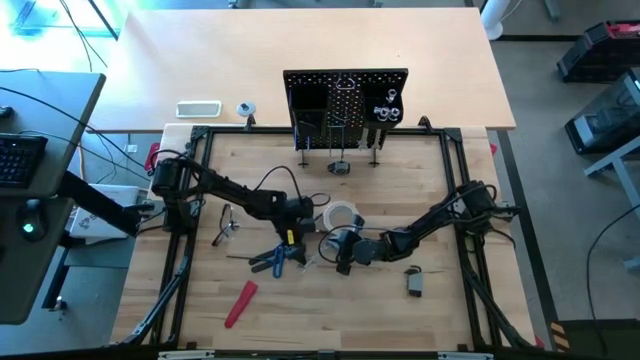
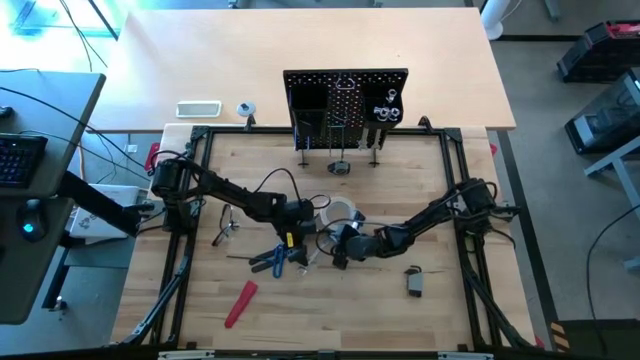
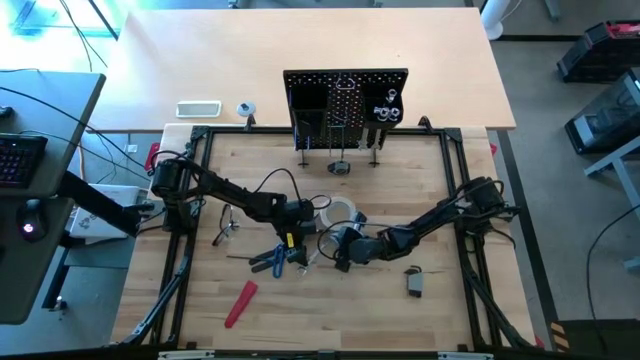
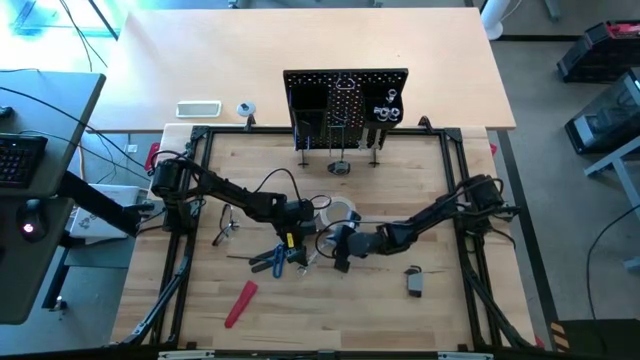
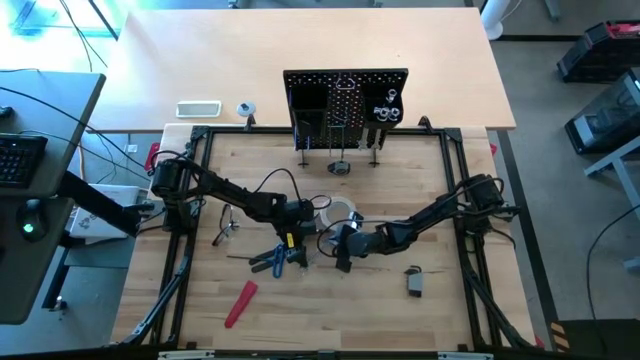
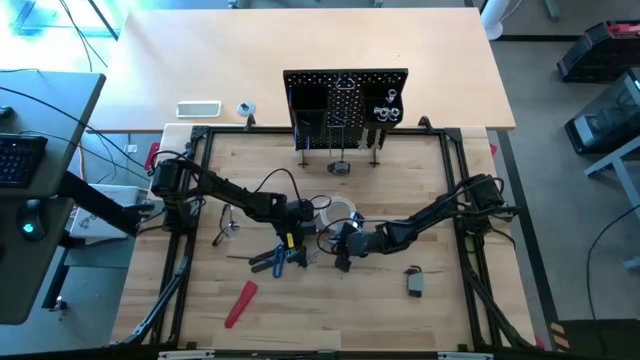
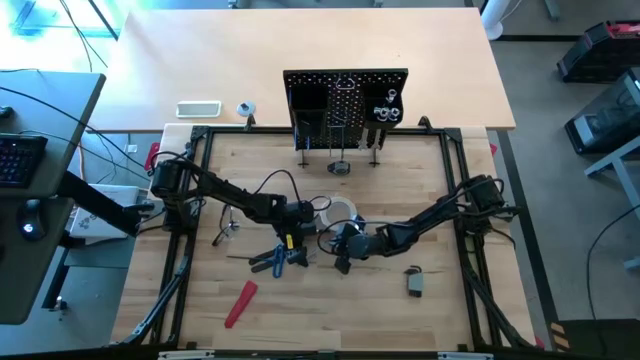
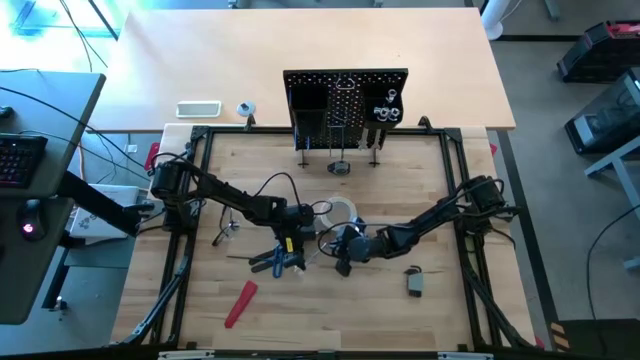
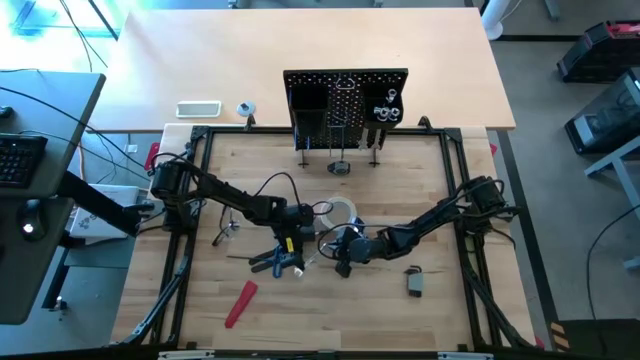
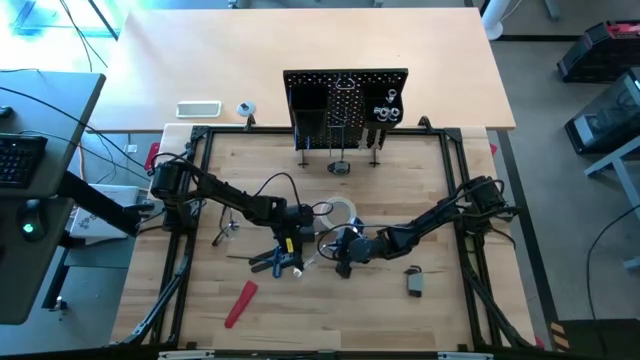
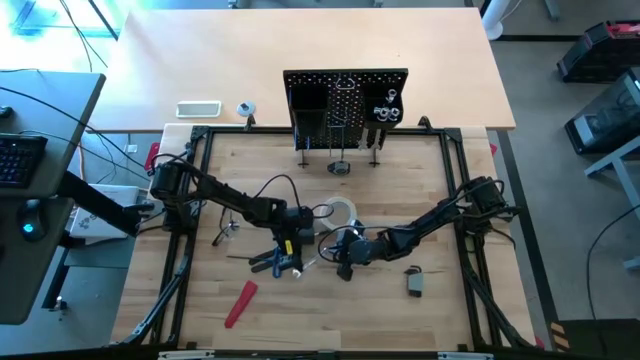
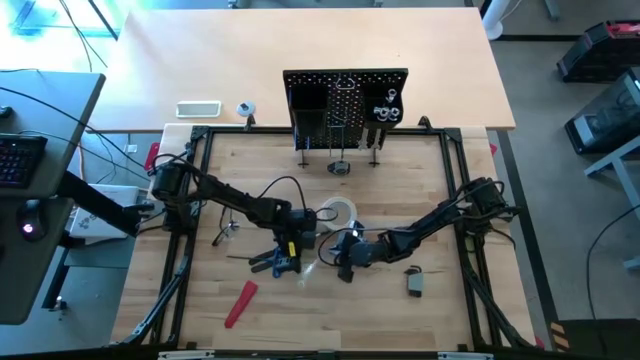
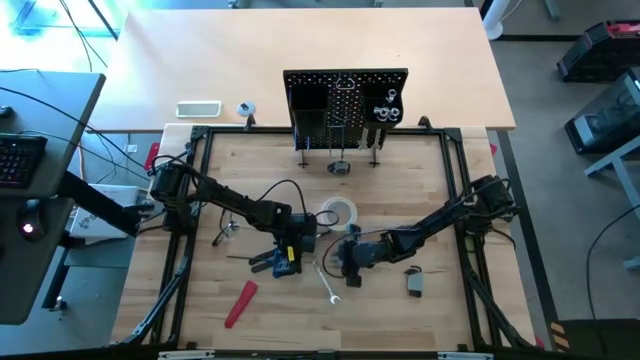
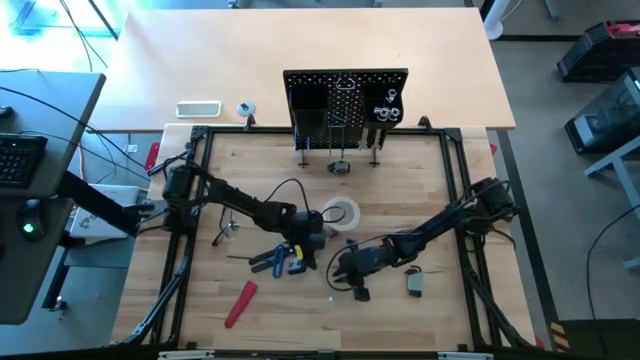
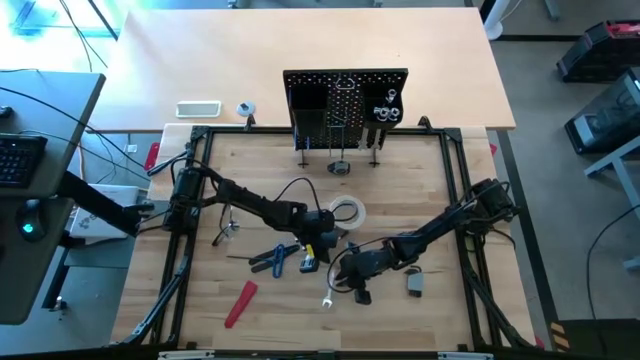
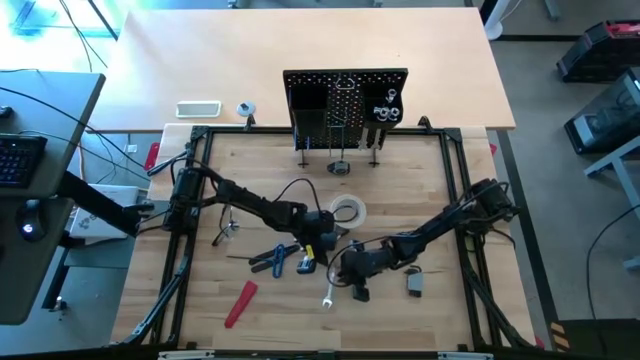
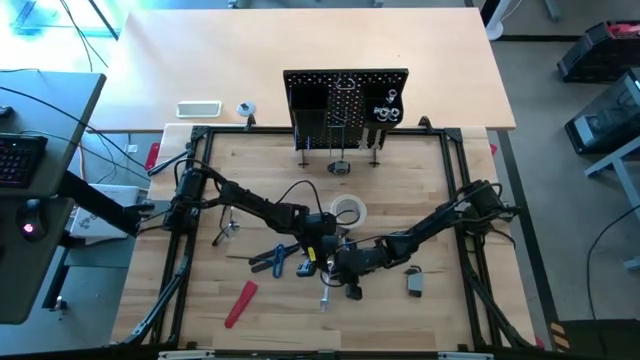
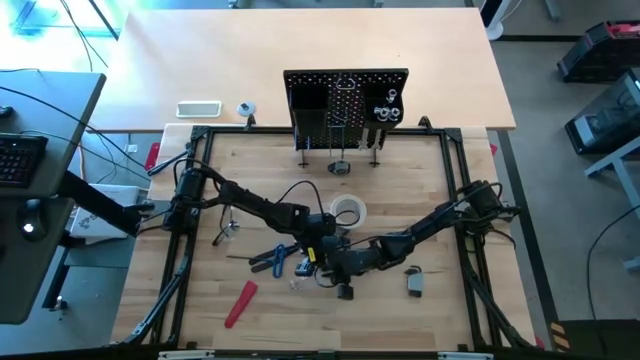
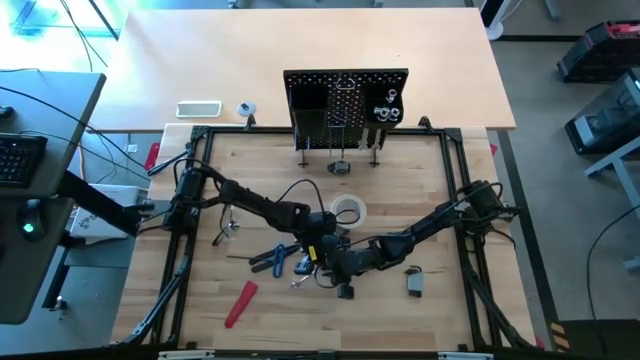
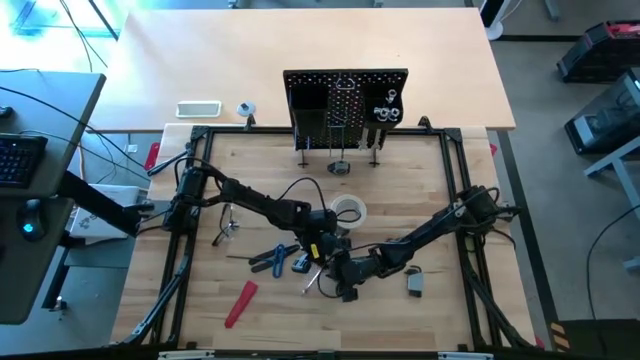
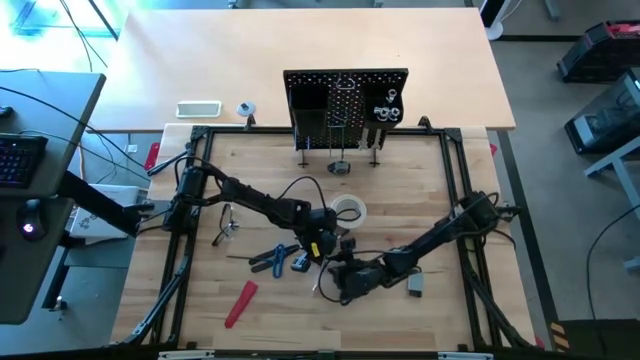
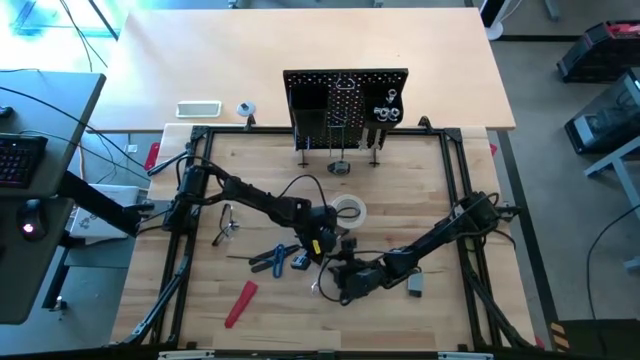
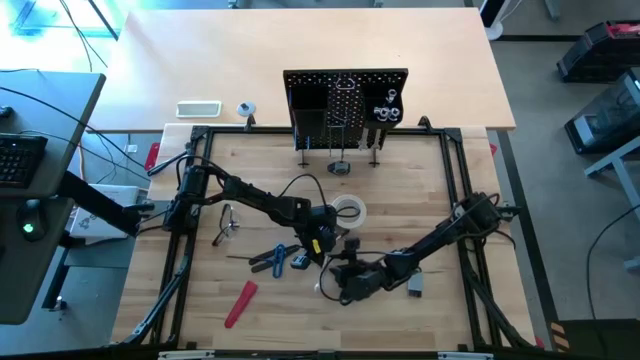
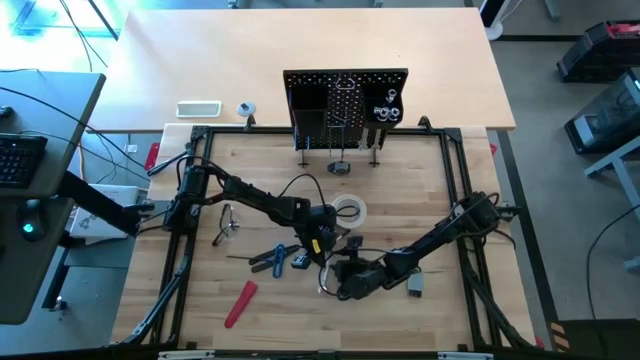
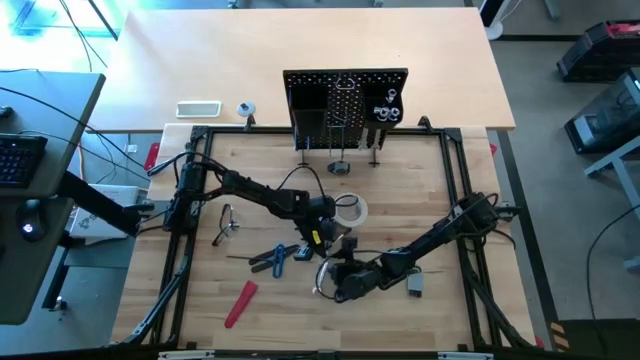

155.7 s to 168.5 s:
Task: Hang tools onto peg board
Hang the silver wrench on the peg board

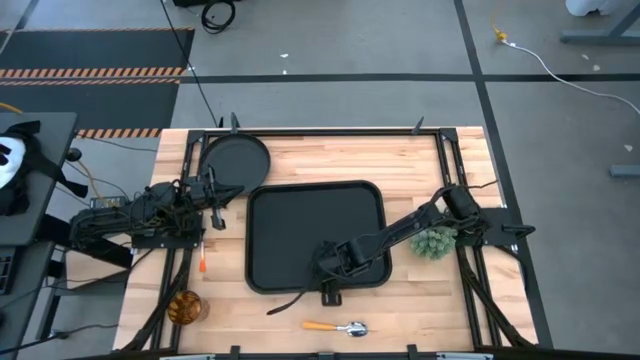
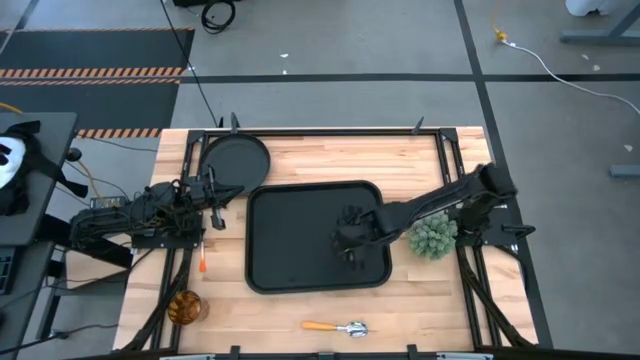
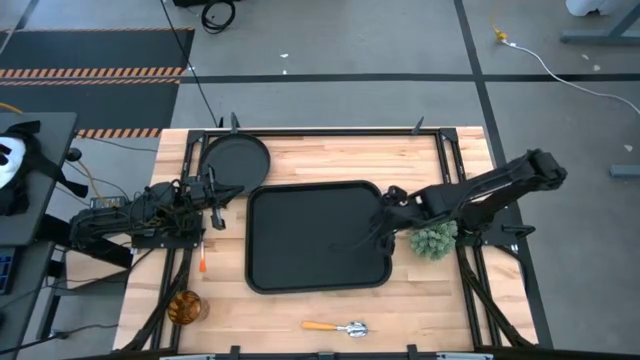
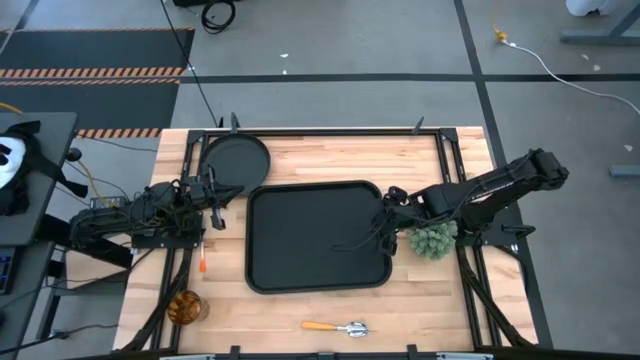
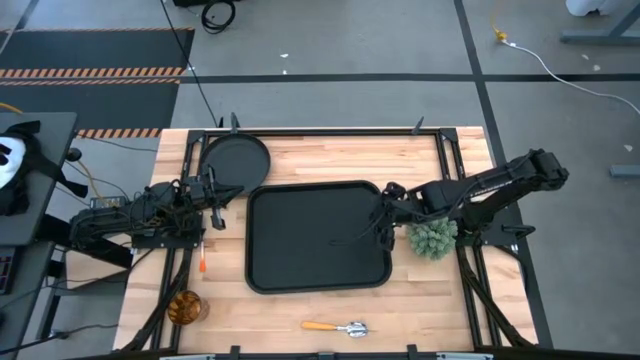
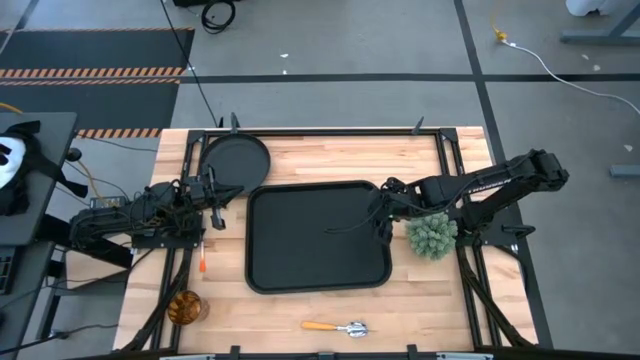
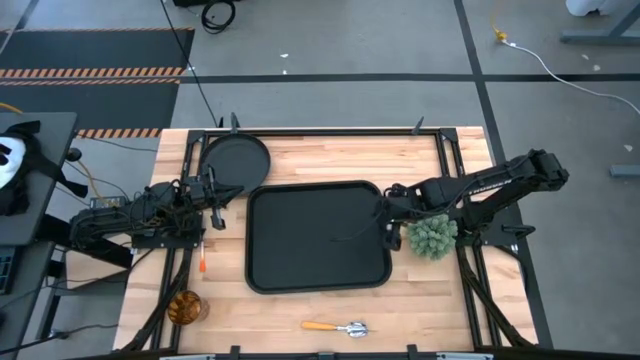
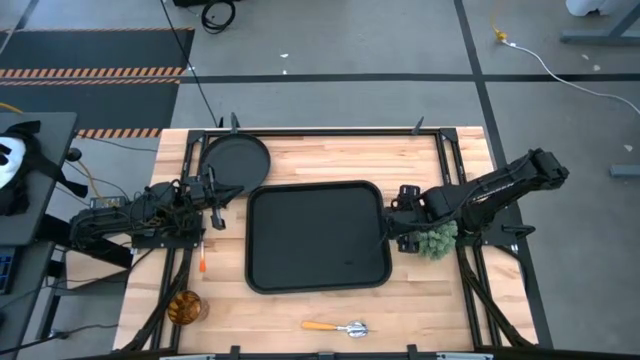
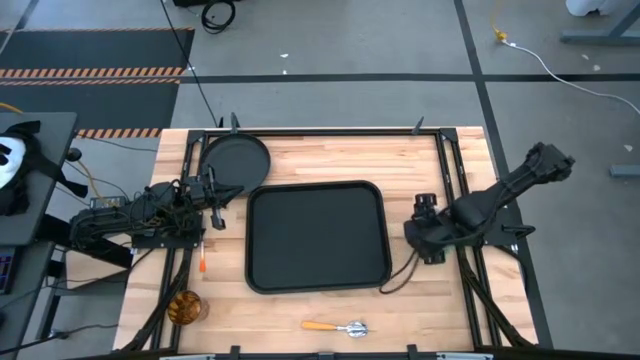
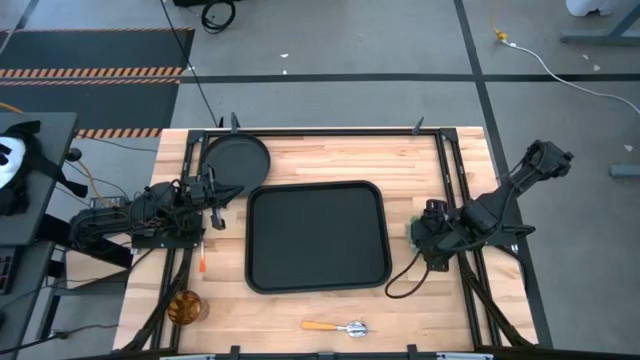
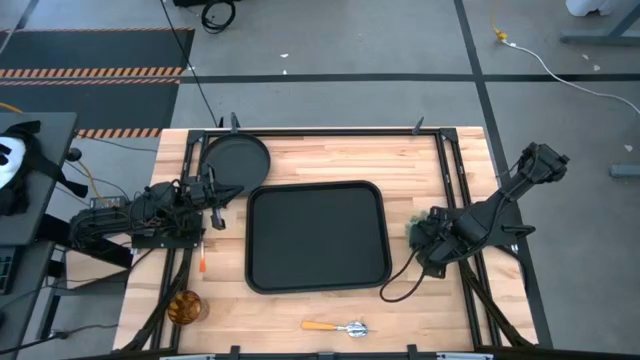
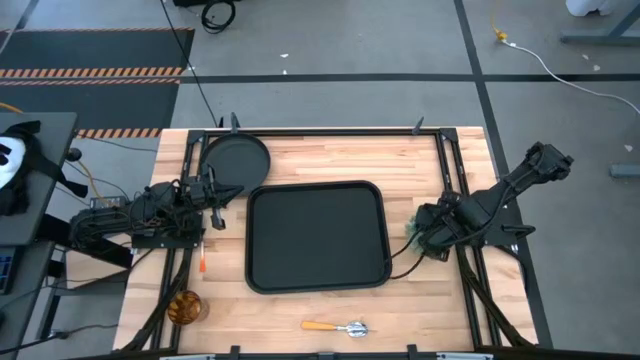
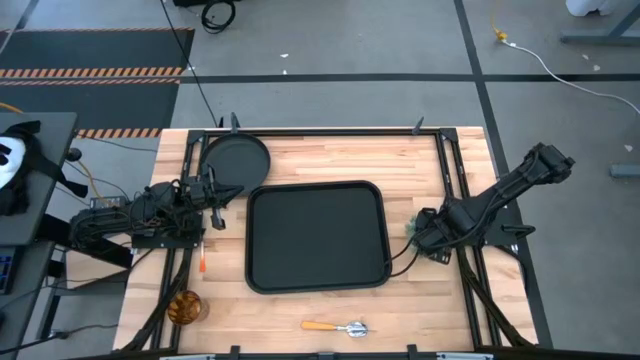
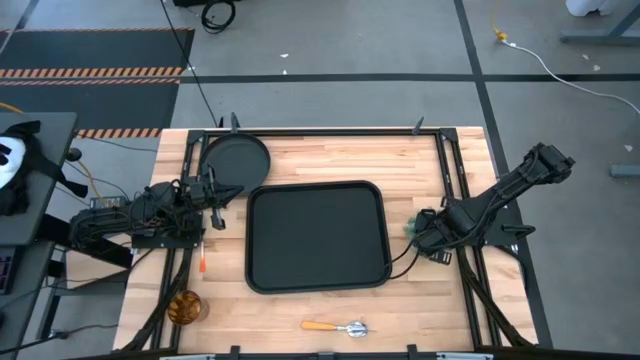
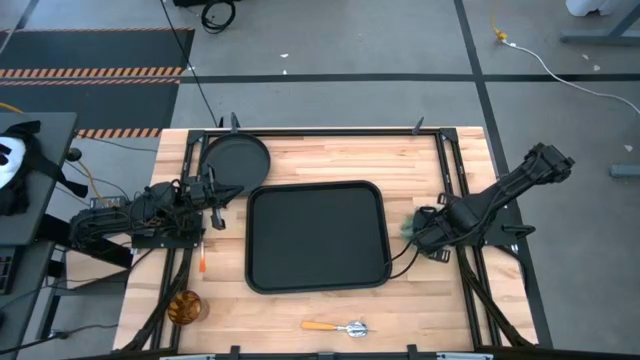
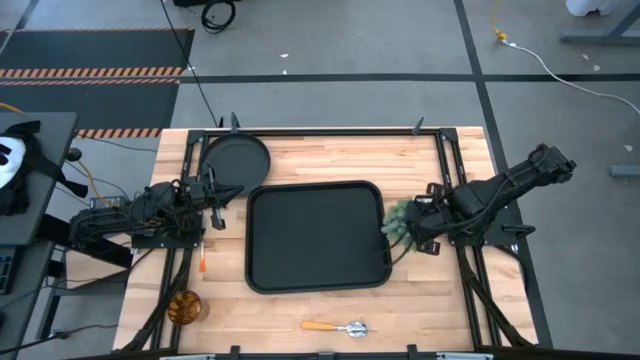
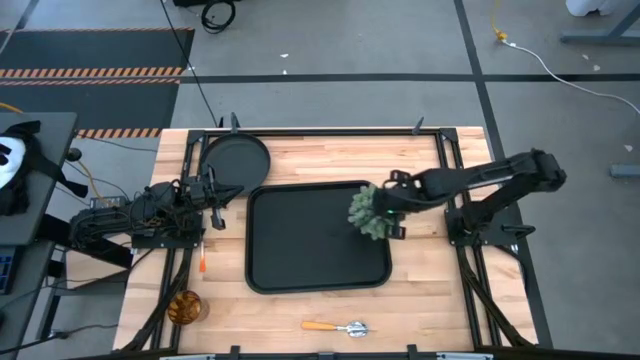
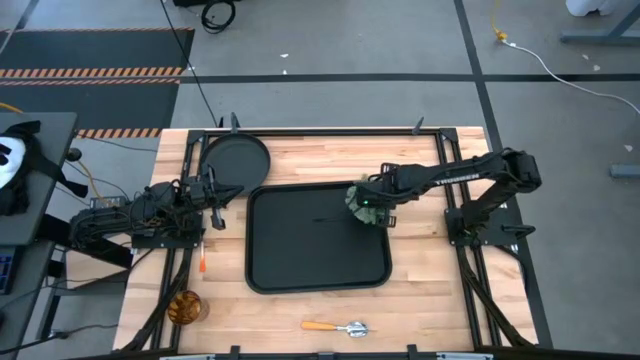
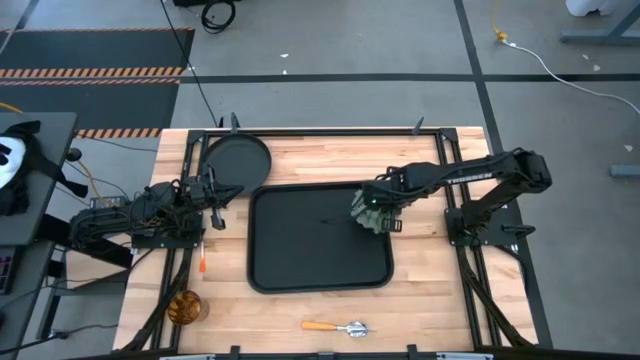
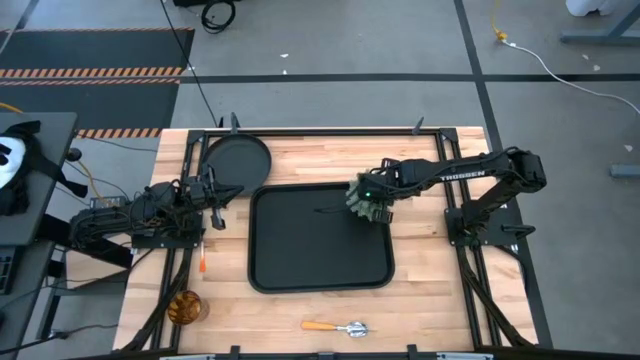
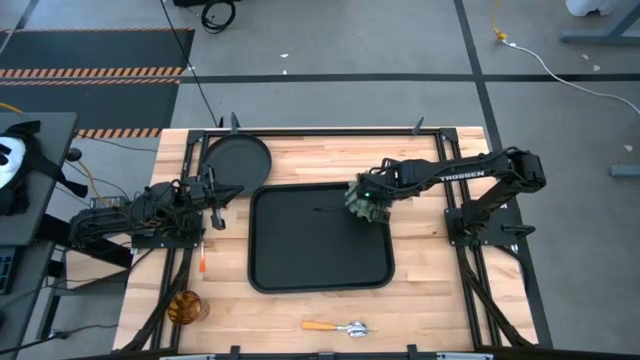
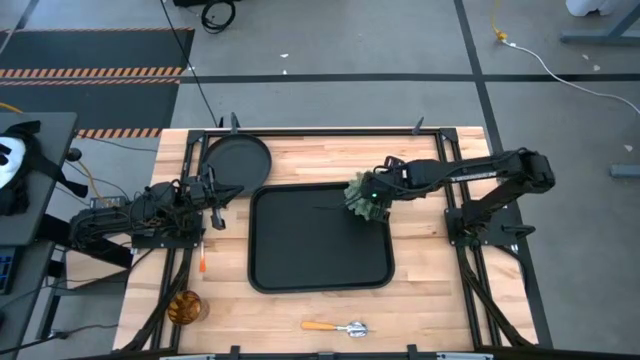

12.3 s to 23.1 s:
Task: Pick and place plate/cup/fork/spoon on tray
Put the green potted plant on the black tray
